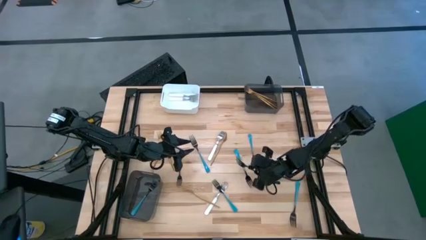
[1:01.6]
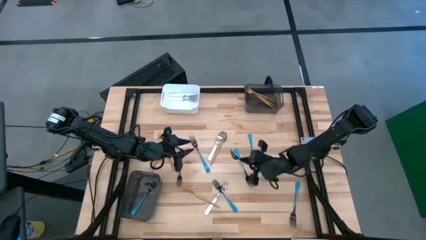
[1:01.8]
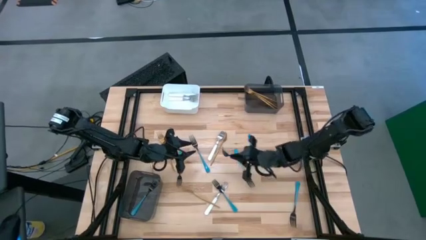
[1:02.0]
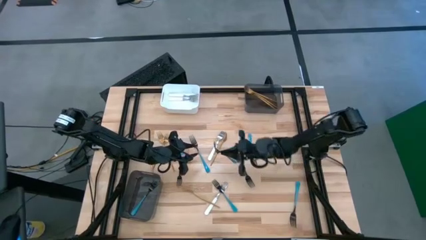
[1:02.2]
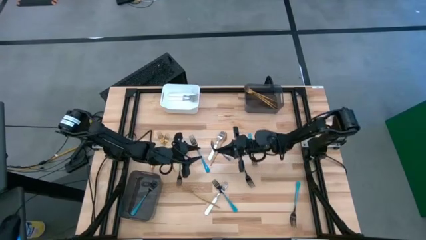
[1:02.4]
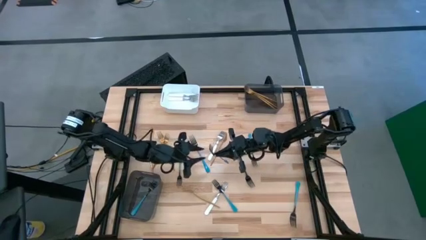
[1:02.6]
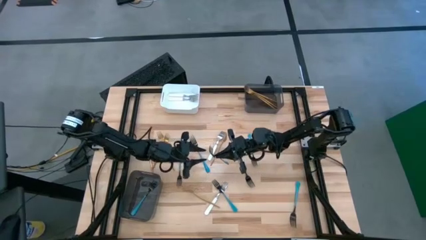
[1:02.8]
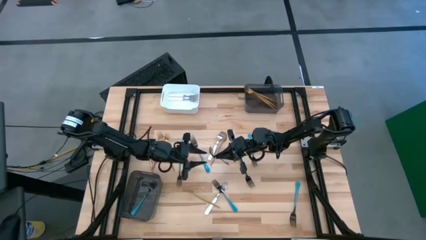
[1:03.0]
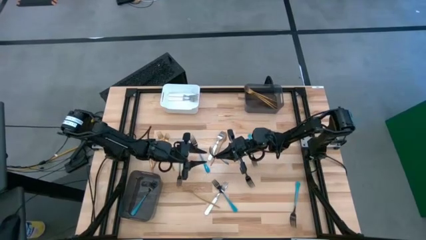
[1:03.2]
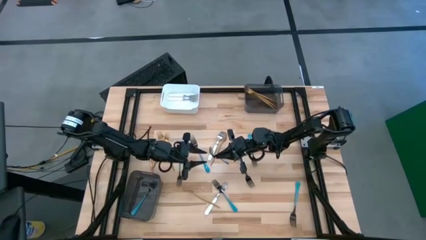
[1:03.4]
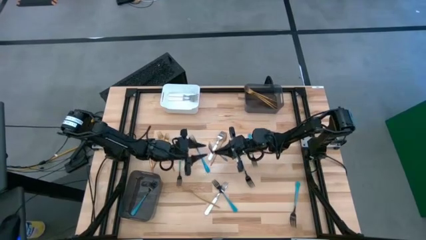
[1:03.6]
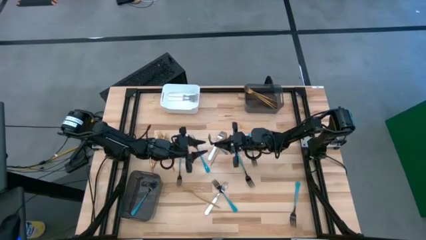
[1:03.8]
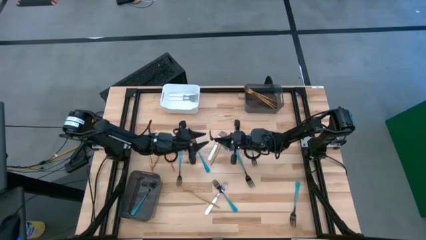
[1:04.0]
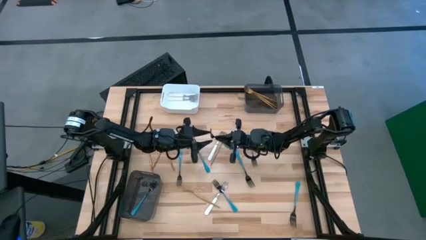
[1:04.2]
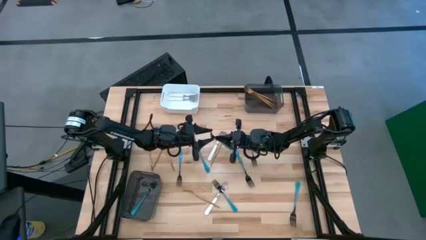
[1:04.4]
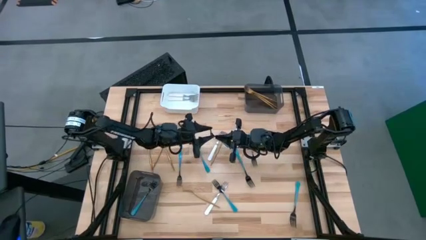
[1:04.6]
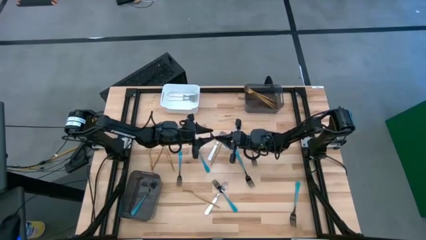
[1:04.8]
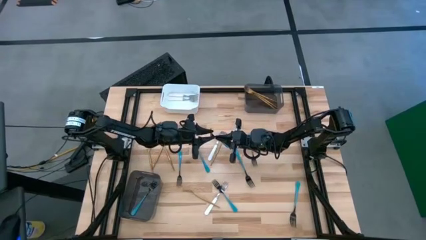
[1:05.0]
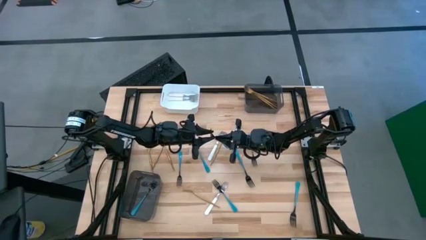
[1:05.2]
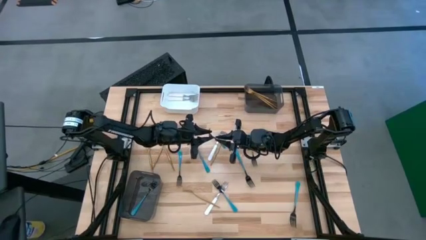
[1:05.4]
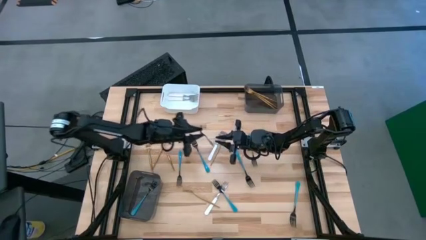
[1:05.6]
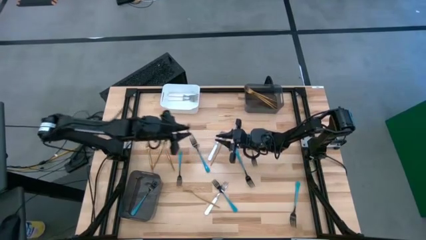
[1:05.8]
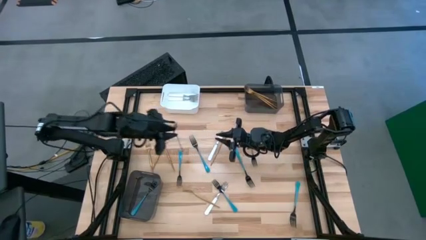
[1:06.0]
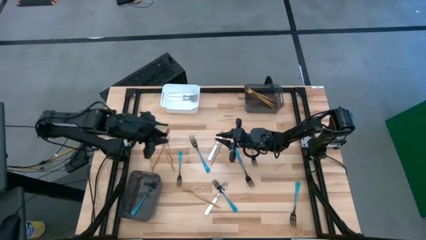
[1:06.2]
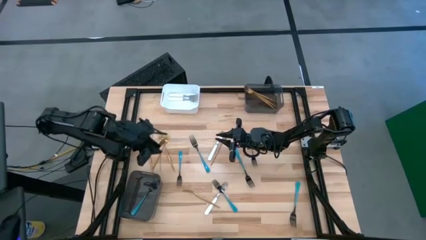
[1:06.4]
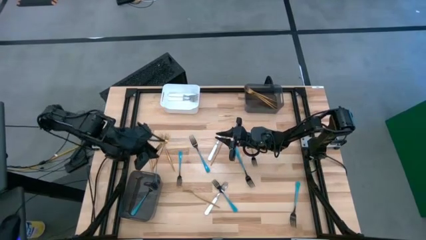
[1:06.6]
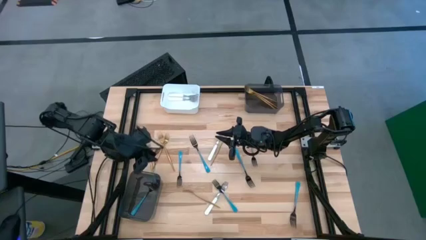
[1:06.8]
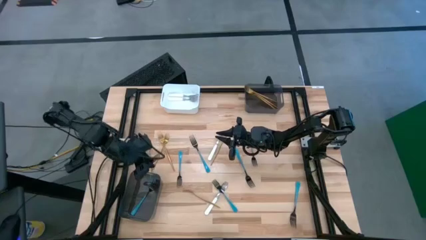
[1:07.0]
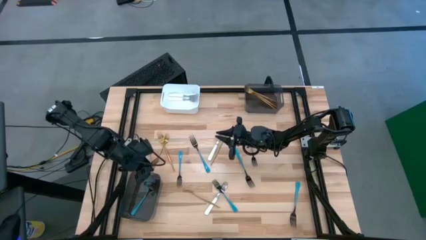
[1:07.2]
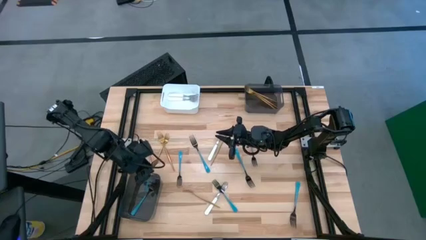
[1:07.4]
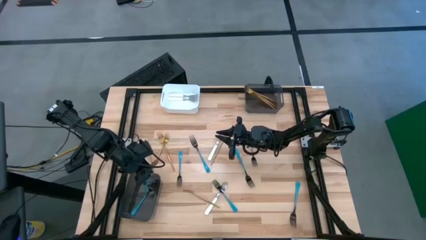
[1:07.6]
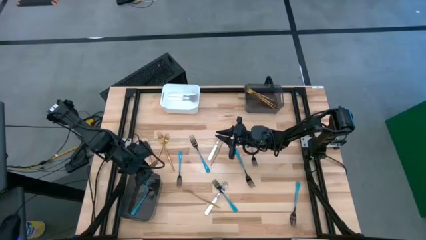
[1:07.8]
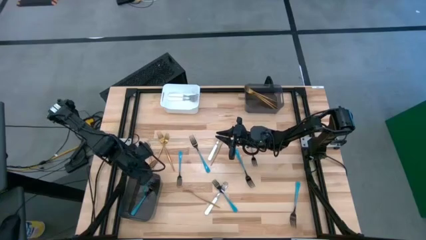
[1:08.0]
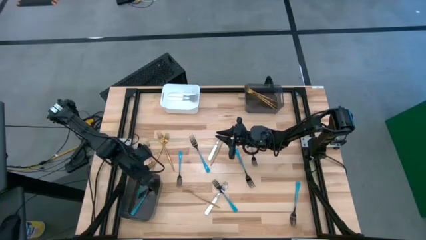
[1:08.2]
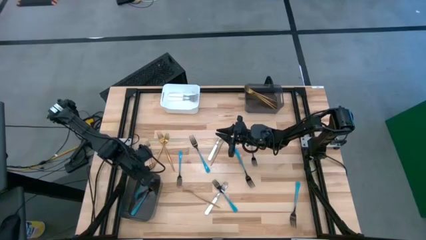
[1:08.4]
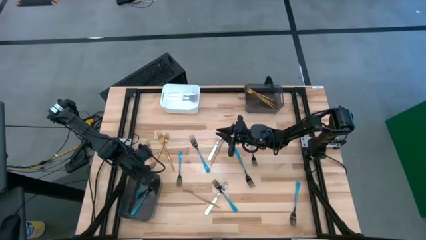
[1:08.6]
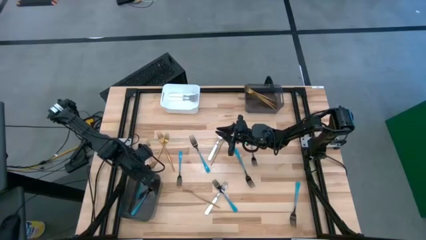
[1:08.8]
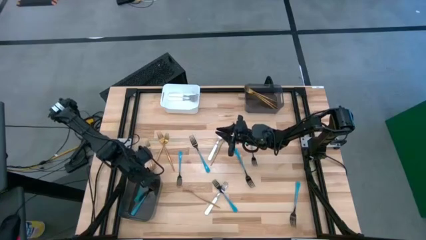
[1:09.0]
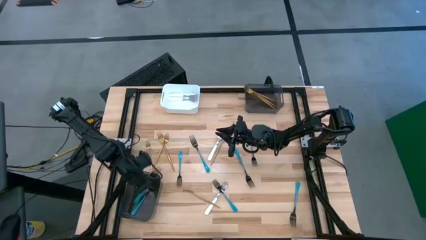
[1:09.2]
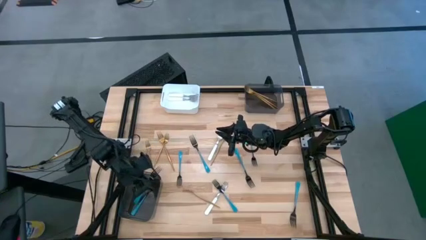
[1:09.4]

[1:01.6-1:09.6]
Task: Sort silverware by color (type)
Put the blue fork into the bottom black bin

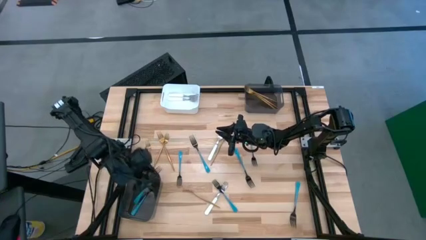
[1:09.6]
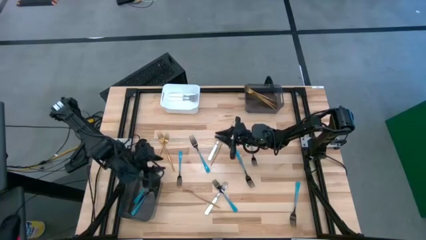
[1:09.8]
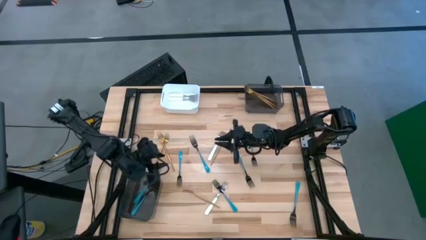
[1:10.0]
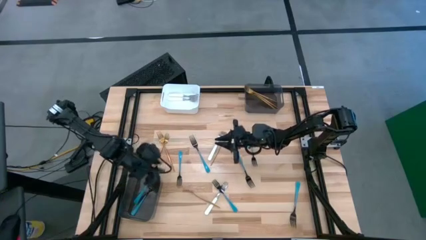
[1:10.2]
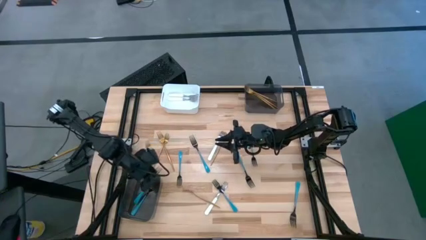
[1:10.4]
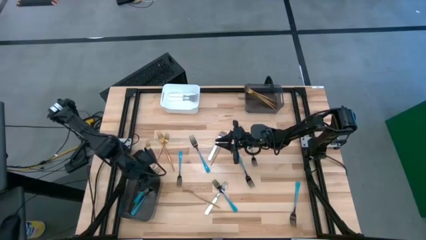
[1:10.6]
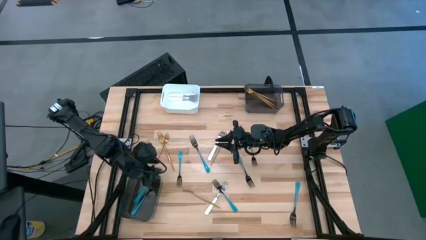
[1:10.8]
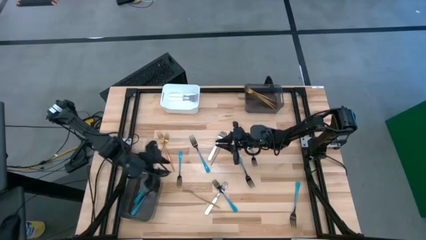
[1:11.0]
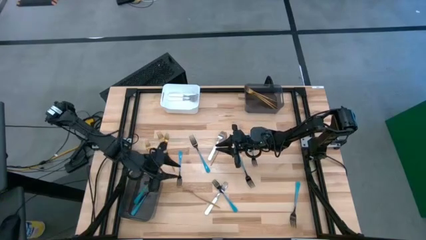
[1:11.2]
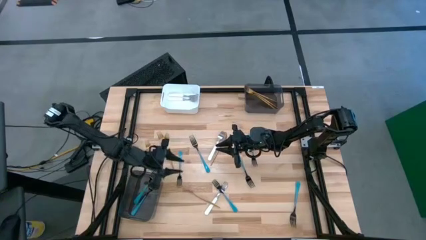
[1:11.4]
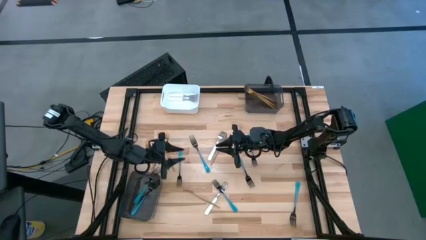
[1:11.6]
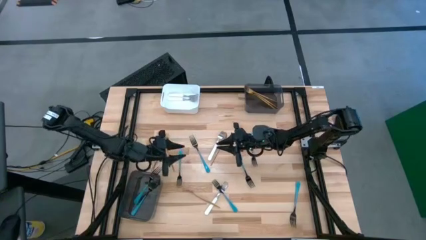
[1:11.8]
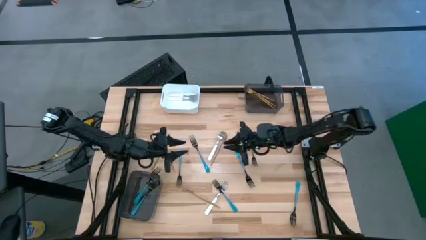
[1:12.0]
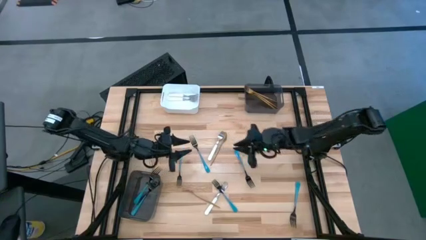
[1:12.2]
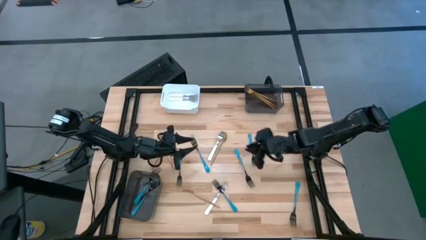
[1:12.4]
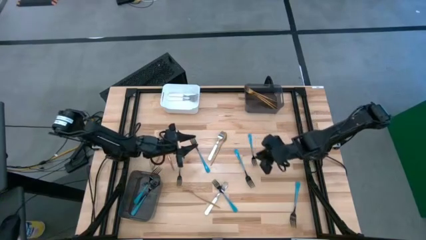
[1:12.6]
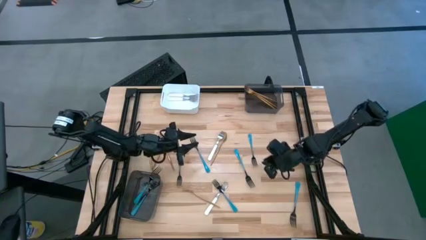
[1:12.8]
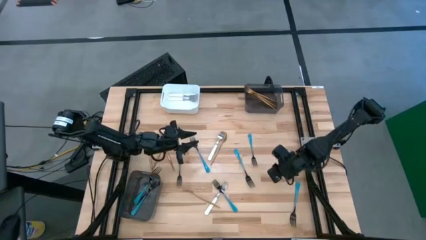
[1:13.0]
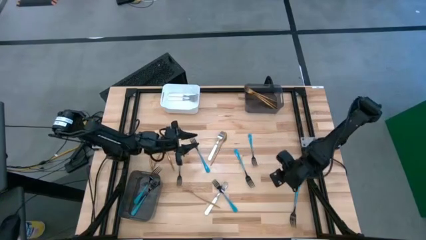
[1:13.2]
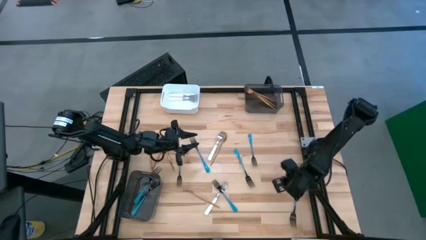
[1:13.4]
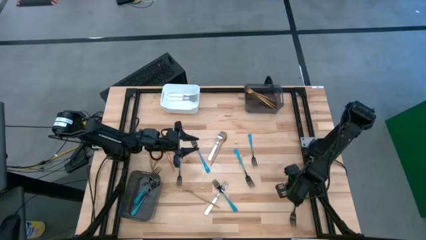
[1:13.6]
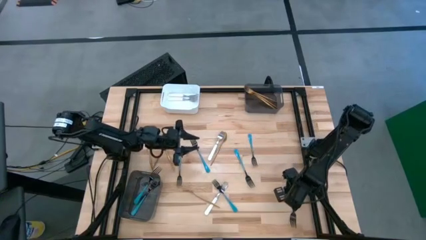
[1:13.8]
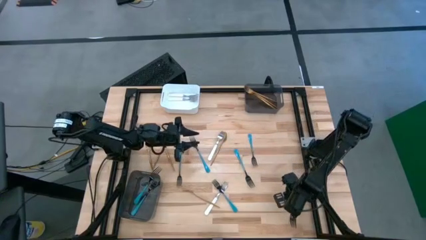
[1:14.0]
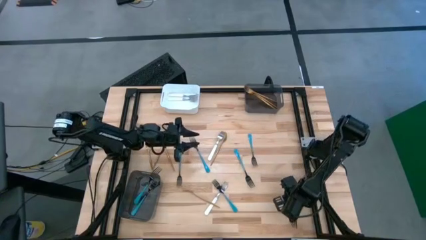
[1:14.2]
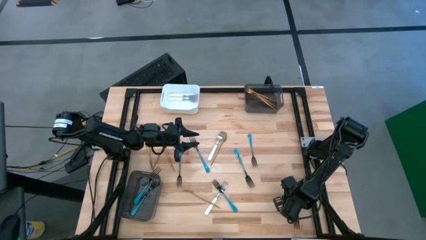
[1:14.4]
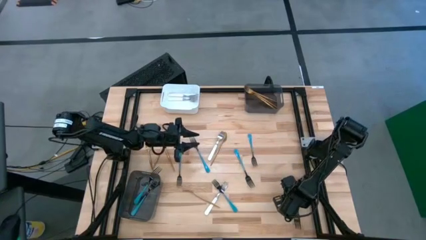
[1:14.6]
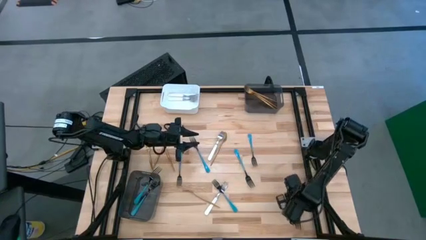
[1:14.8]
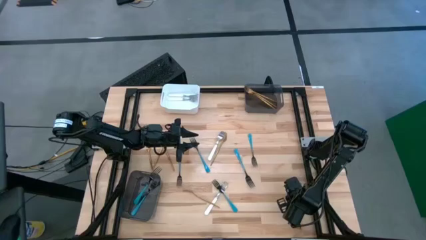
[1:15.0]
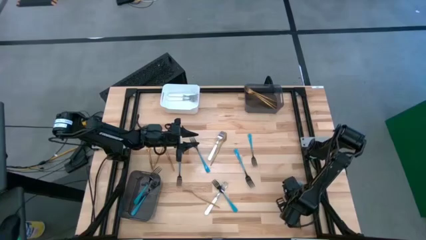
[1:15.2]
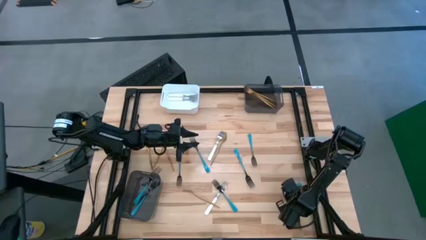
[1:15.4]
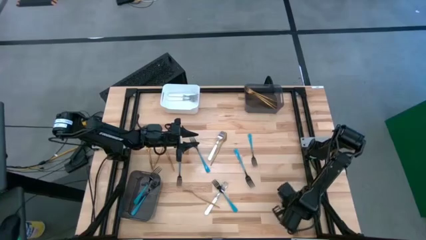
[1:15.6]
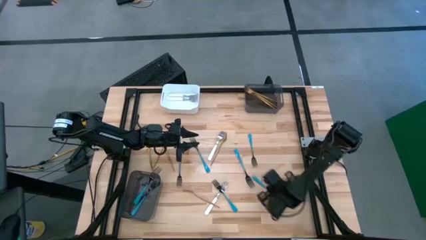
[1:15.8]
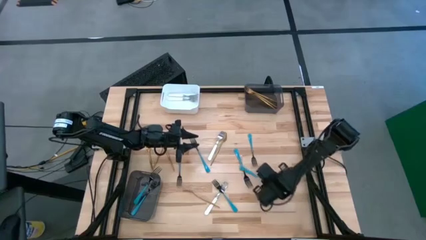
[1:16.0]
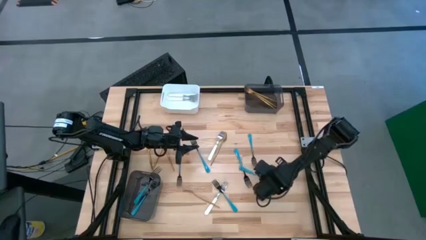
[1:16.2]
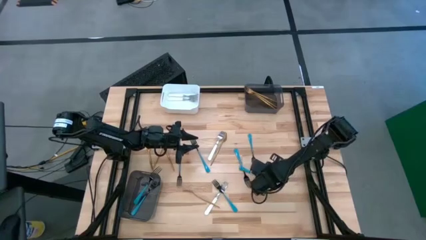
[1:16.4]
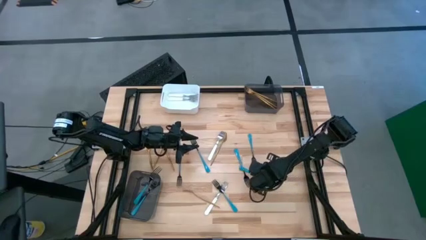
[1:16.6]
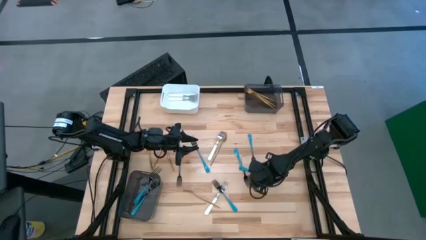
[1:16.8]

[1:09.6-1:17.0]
Put the blue fork into the bottom black bin

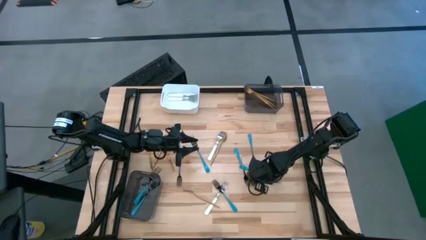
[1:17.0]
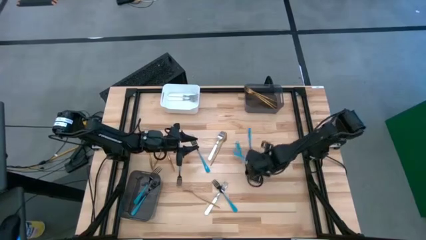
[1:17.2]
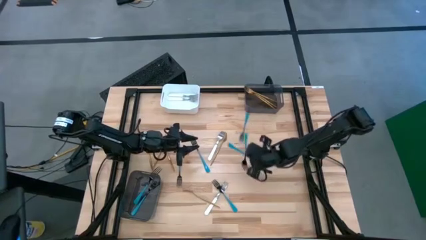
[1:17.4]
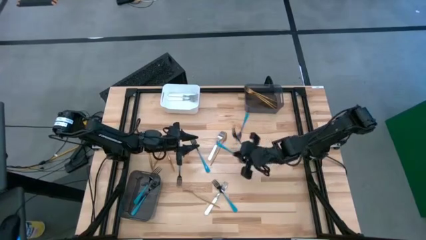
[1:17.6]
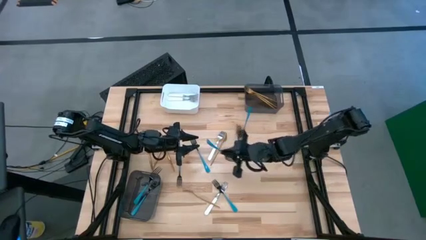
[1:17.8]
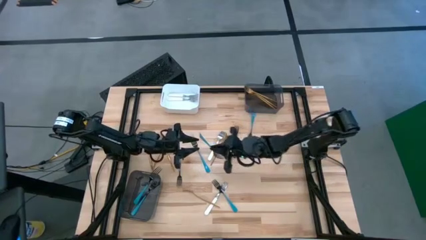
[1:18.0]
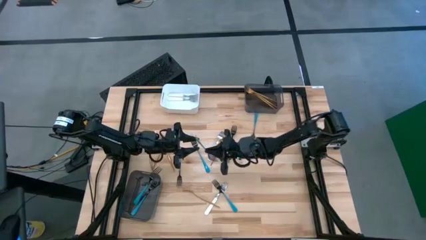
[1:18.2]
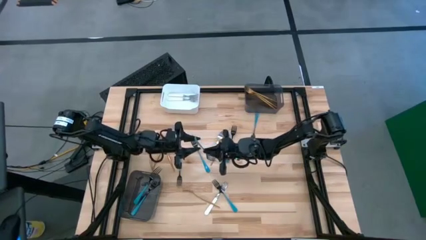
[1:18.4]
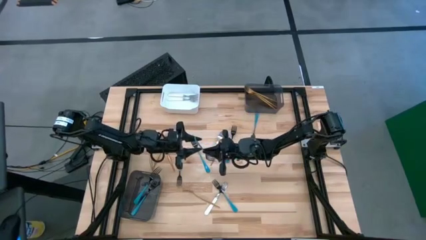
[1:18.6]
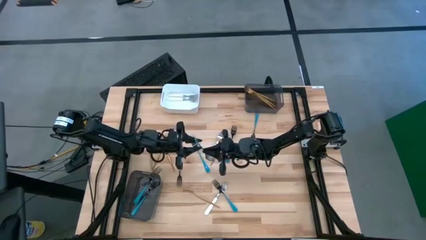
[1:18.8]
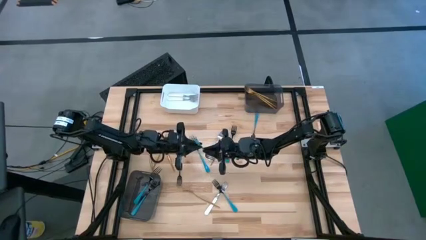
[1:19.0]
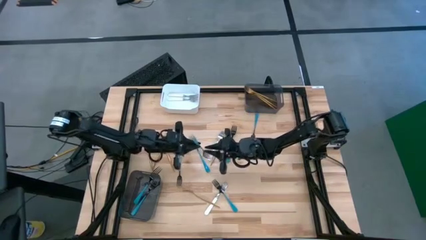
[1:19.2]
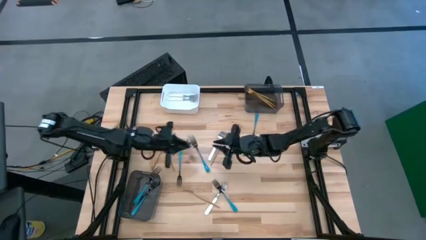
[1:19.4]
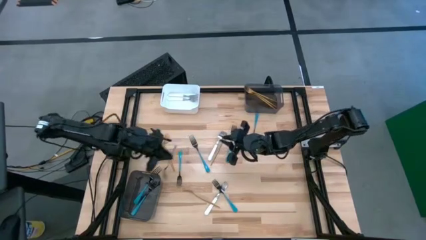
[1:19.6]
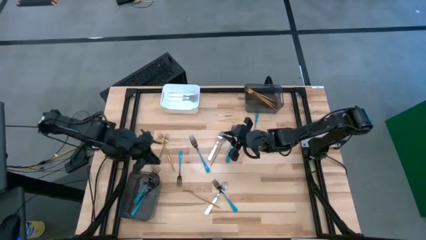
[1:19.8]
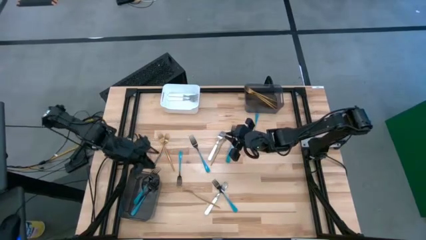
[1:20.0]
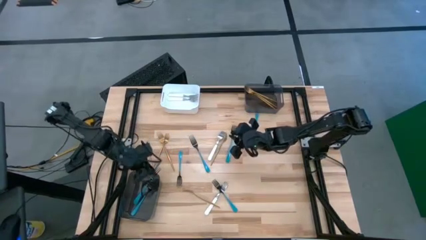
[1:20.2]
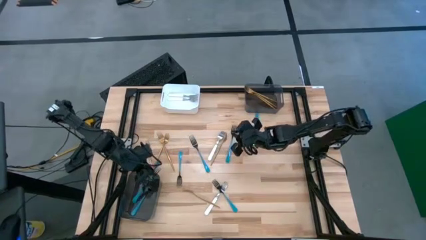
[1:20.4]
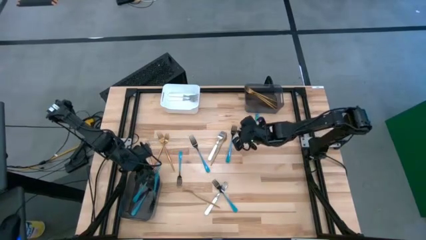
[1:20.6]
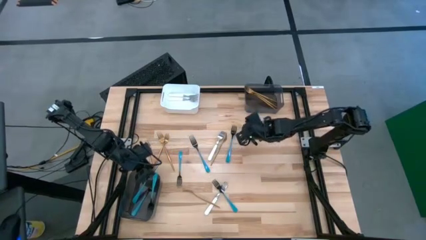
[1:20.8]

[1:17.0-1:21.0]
Put the blue fork into the bottom black bin
